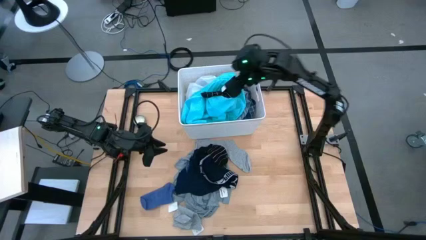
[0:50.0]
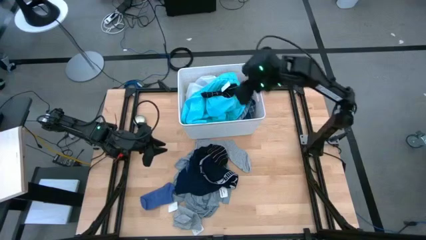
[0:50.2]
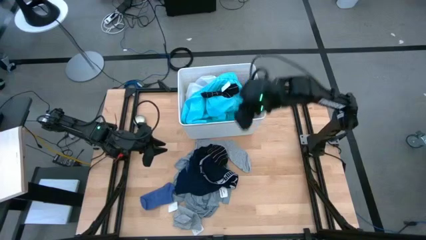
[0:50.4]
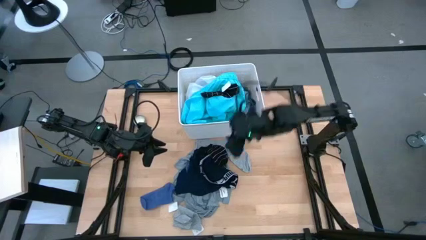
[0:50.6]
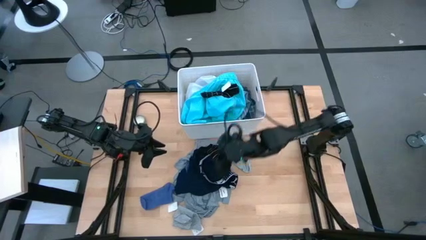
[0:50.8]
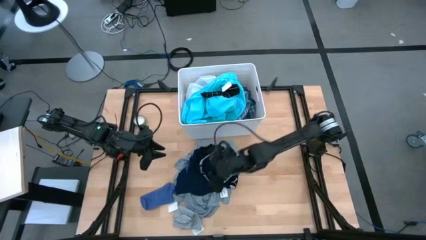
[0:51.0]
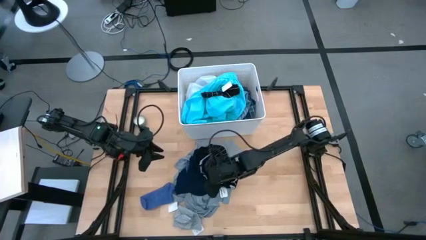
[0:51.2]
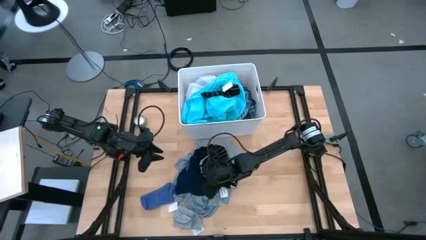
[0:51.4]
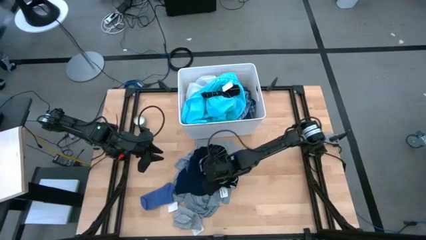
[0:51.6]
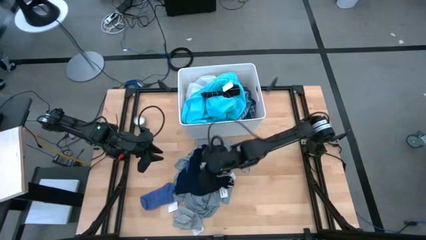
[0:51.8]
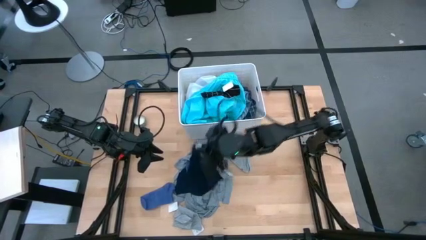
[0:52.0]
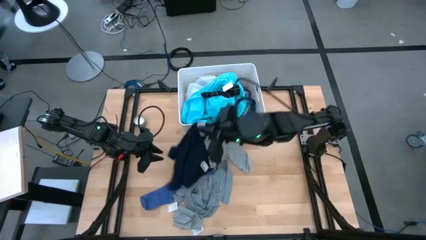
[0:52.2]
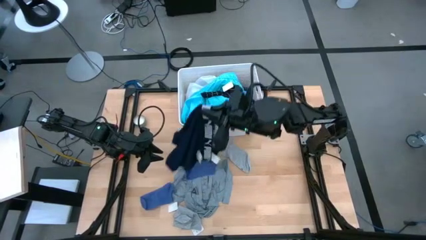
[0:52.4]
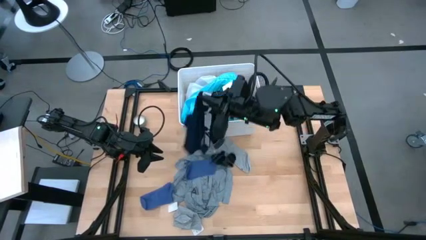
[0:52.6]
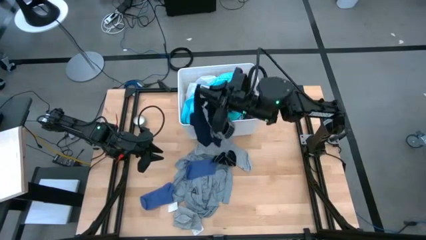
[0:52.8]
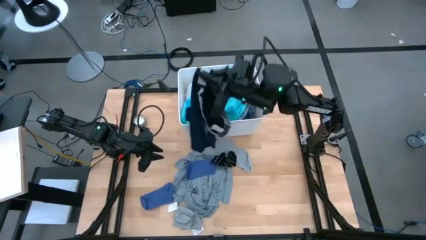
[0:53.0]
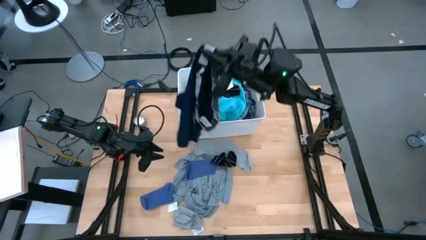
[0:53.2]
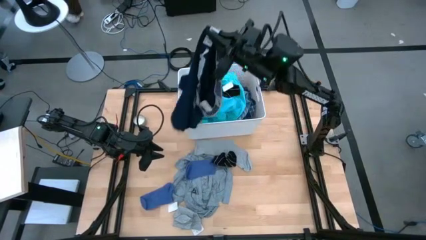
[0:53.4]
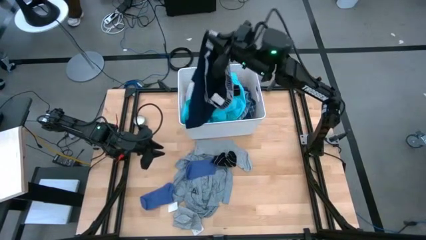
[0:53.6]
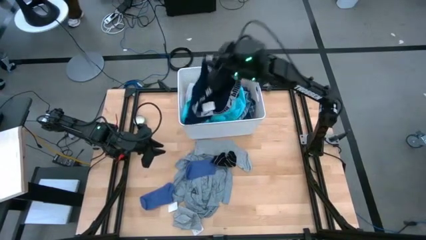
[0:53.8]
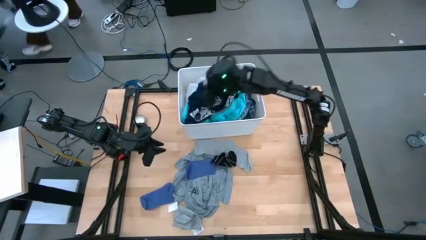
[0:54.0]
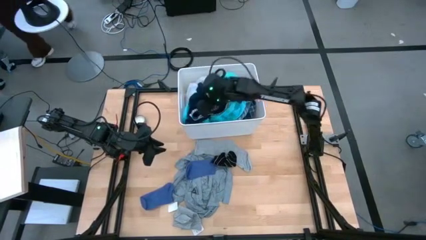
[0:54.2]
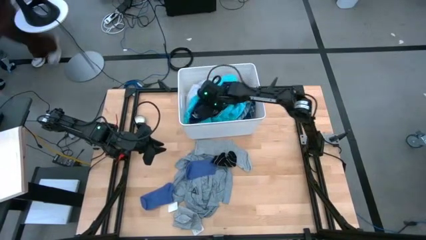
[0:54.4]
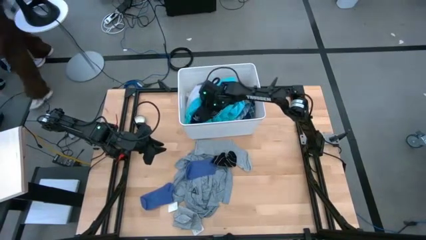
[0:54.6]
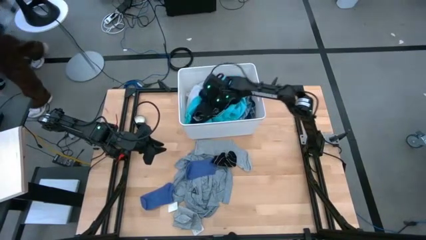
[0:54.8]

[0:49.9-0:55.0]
Task: Sort clothes
Put the black boxers into the bin

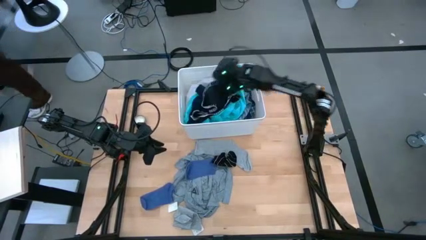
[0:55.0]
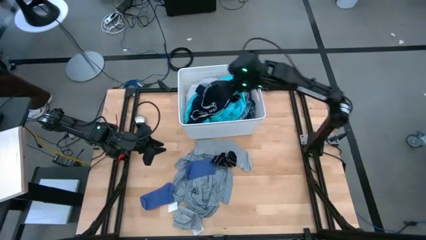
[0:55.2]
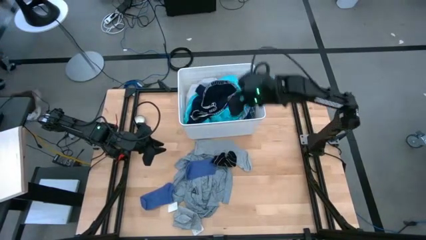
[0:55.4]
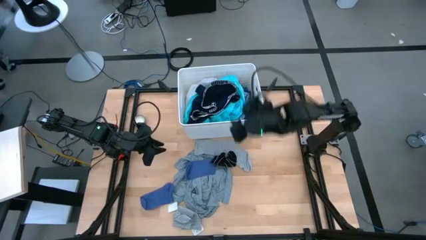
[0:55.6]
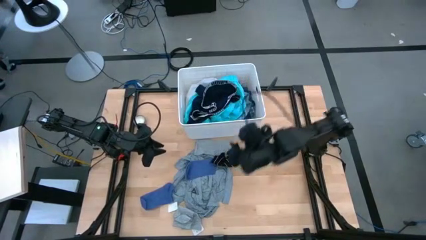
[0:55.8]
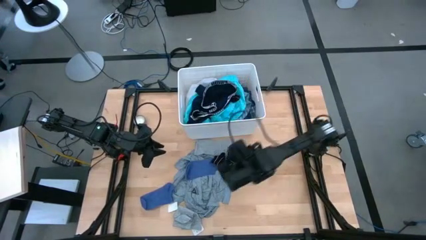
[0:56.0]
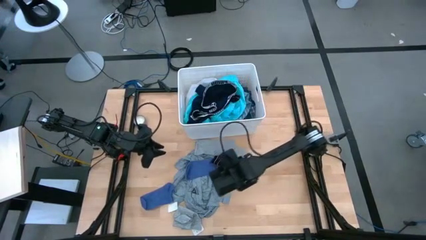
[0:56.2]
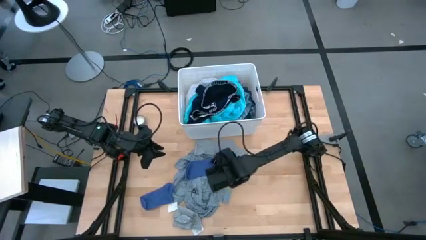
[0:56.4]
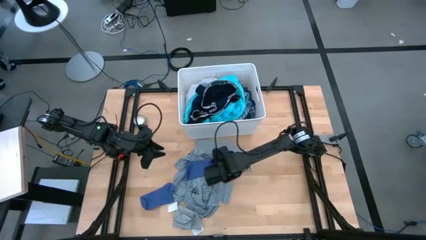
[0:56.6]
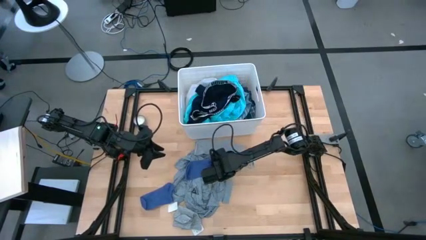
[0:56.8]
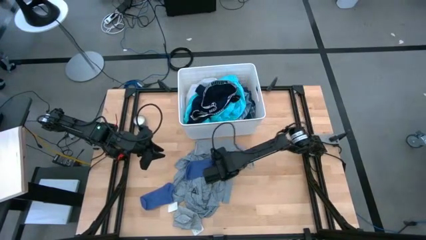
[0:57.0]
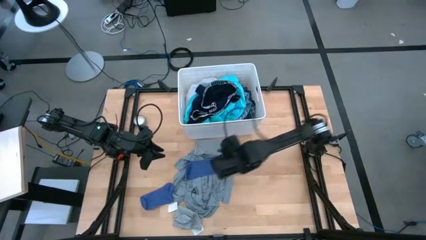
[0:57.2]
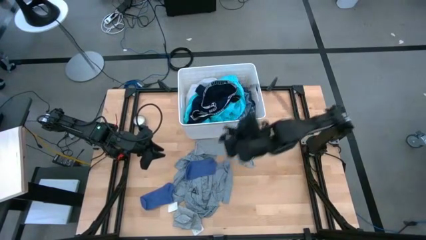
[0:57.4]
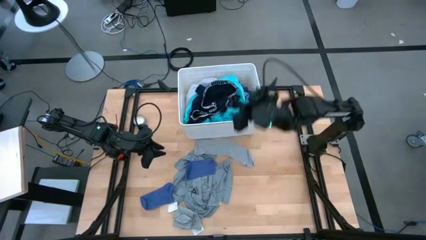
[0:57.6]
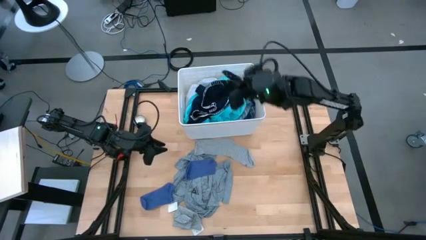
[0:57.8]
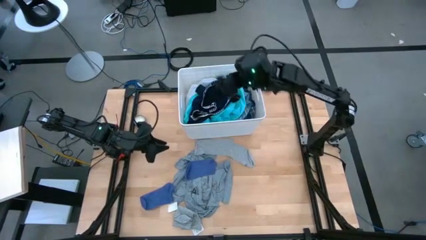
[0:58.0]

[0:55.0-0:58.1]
Put the black sock into the bin

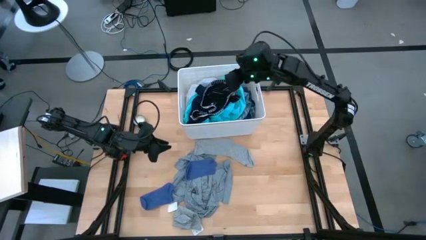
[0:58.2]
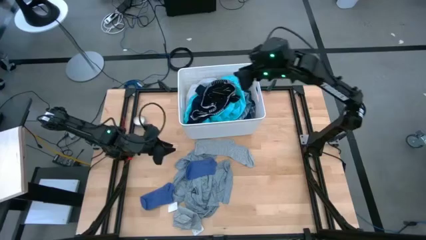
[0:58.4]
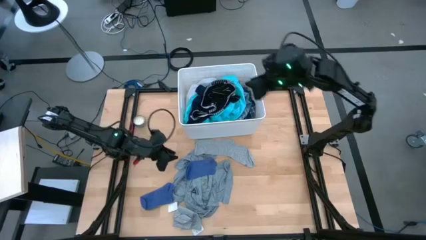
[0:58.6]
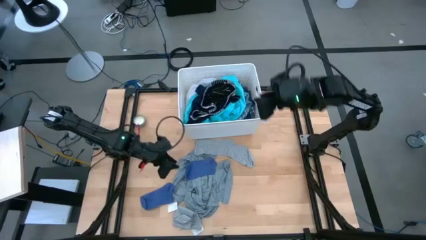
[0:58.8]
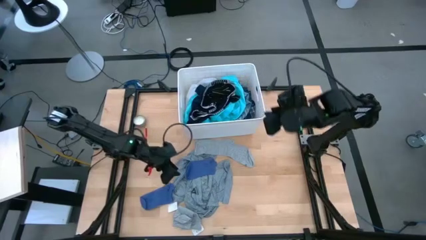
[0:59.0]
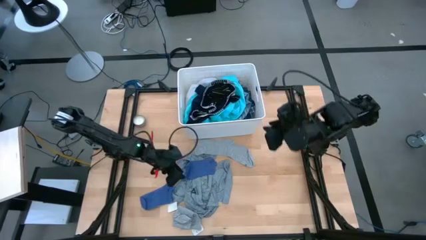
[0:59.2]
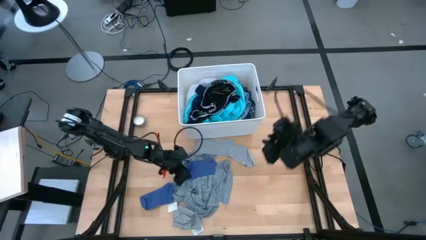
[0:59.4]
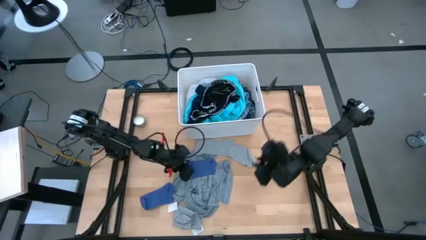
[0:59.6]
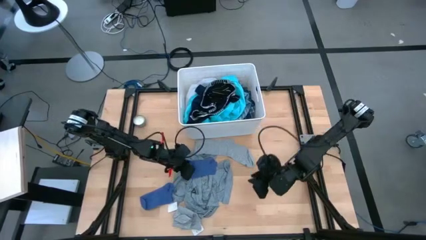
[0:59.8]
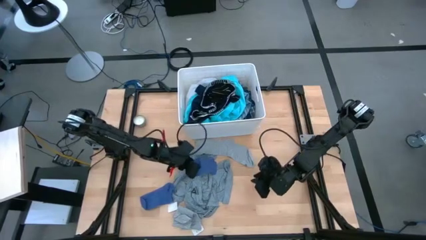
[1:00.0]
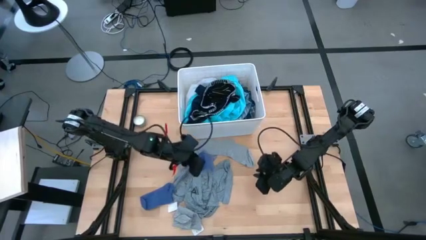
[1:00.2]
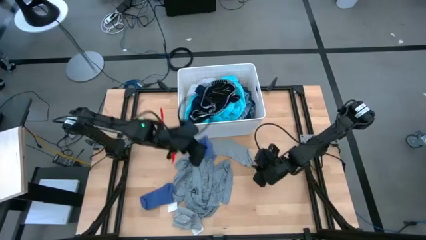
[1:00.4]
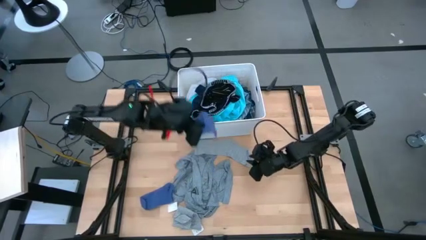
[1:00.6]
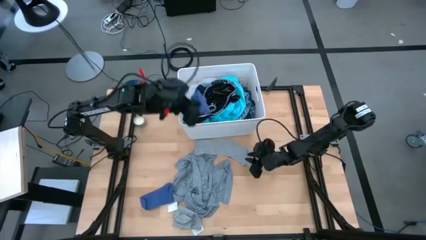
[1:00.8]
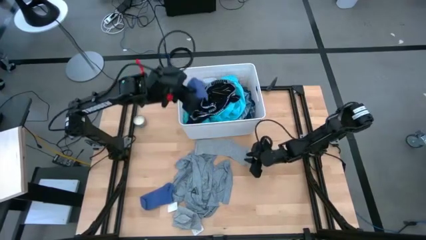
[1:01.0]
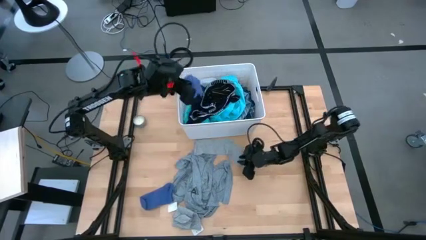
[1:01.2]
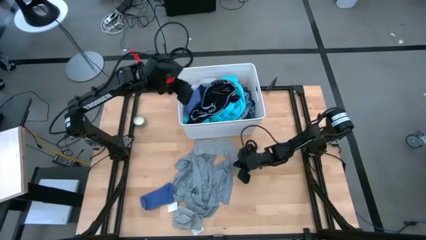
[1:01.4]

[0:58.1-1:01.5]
Put the top blue sock into the bin

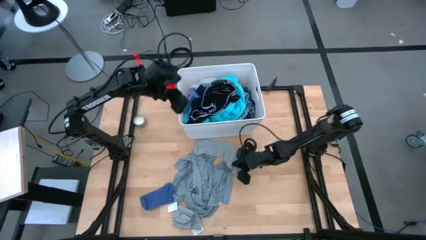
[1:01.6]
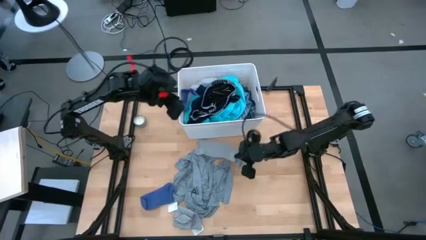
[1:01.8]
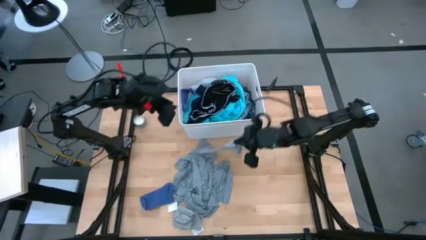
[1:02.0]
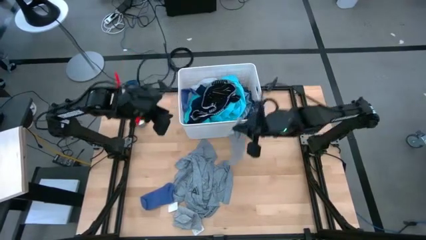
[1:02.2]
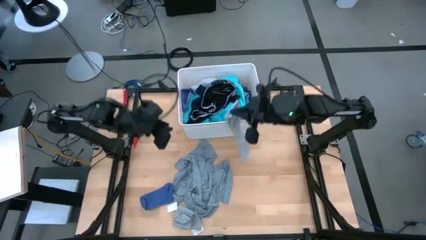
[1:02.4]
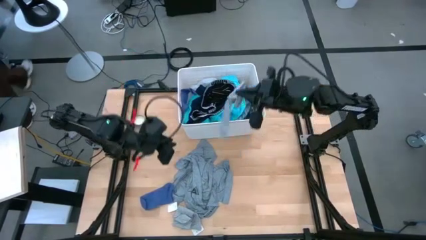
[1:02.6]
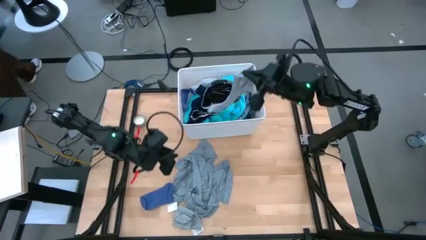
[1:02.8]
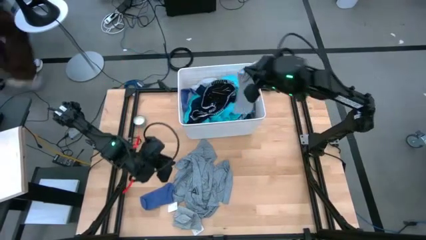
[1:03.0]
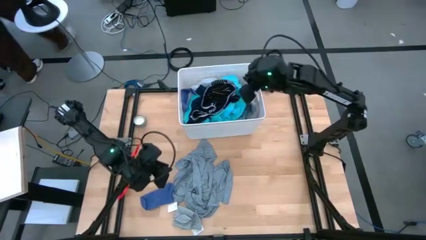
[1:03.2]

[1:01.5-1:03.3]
Put the top gray sock into the bin

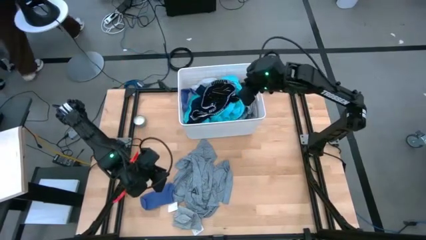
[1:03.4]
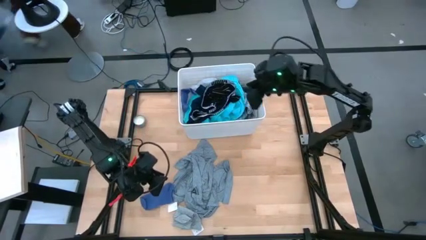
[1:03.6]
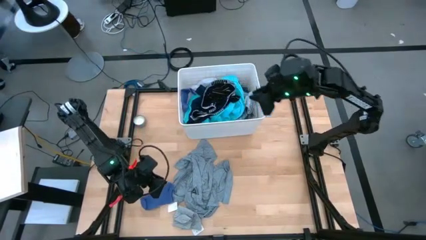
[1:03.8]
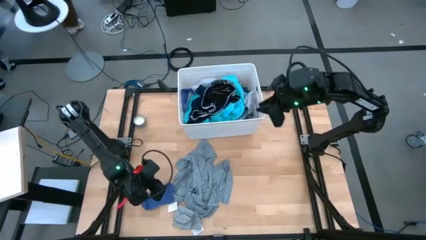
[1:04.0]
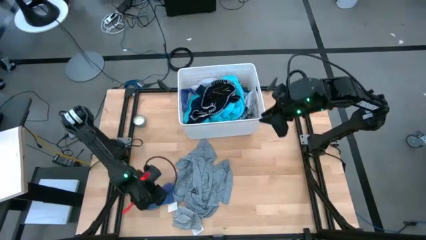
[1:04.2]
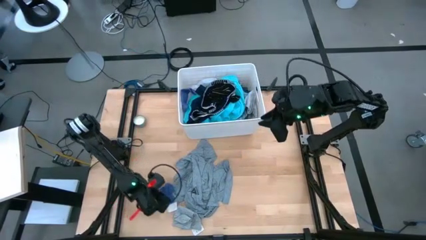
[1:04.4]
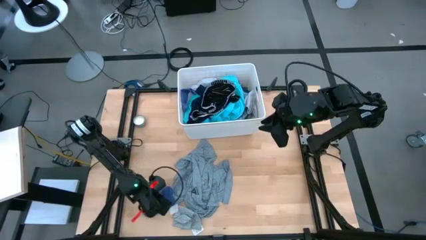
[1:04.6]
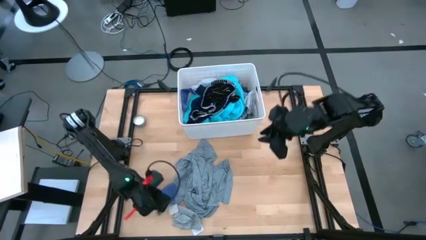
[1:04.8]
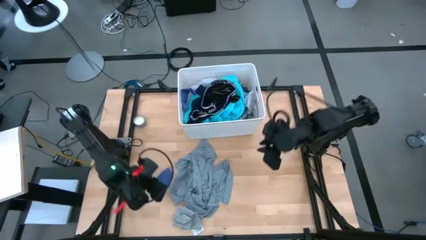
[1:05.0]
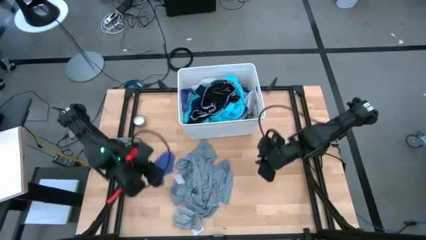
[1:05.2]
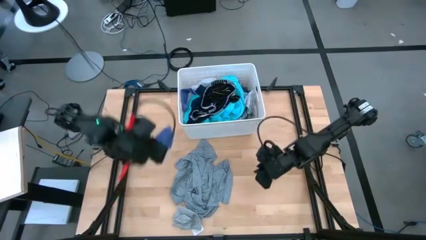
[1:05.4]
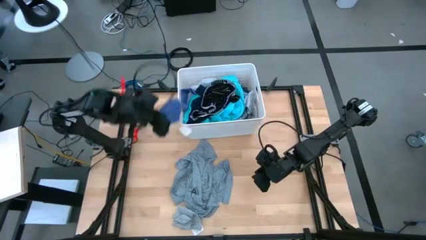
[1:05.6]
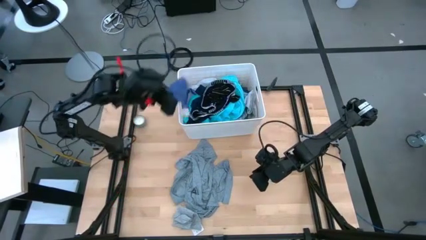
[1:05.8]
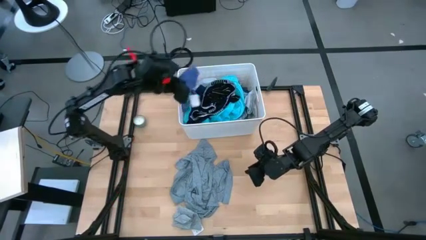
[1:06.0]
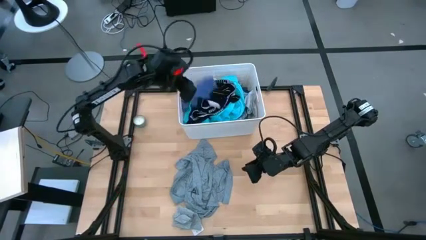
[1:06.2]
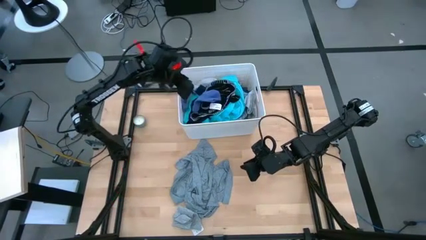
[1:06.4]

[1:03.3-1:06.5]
Put the blue sock into the bin
